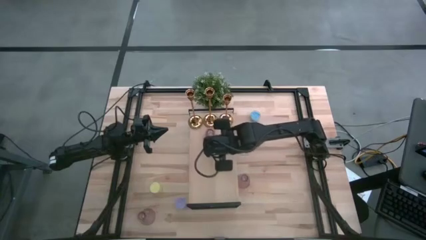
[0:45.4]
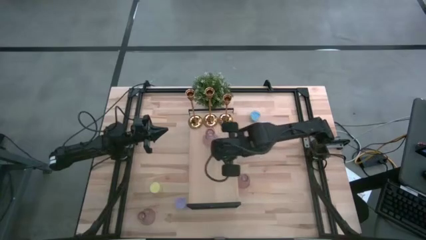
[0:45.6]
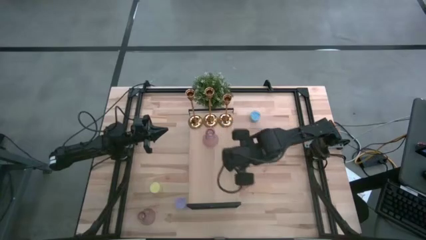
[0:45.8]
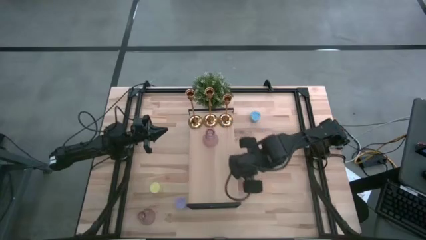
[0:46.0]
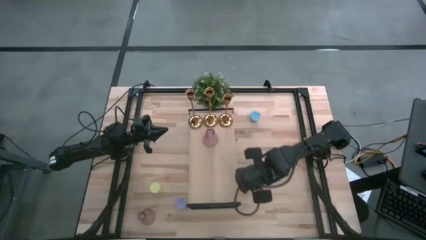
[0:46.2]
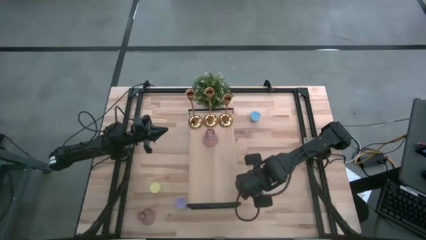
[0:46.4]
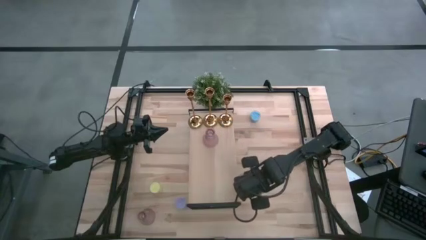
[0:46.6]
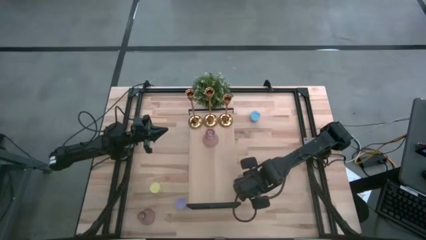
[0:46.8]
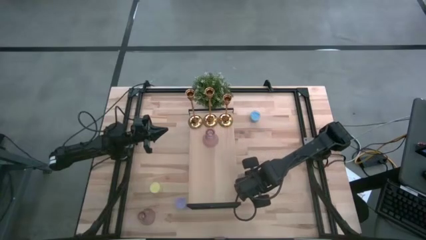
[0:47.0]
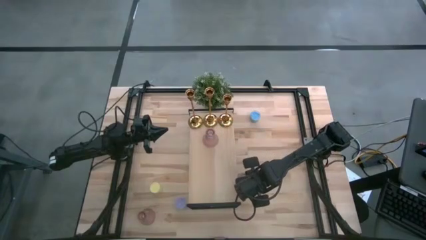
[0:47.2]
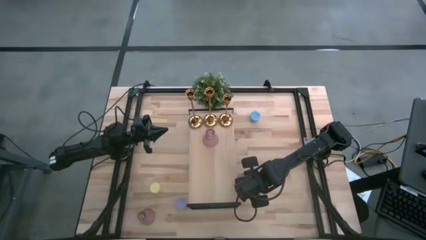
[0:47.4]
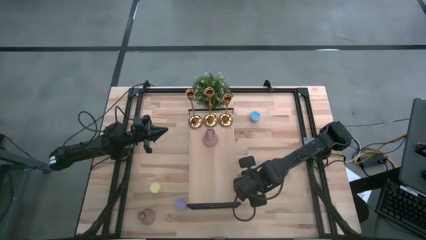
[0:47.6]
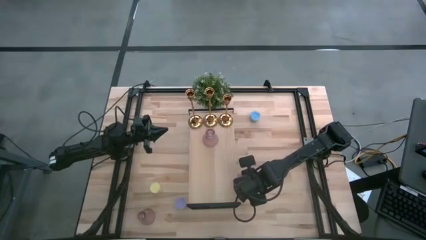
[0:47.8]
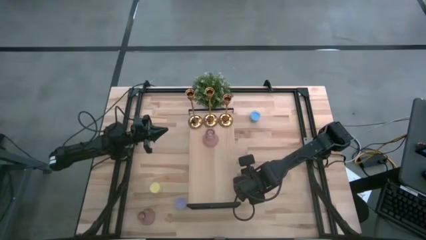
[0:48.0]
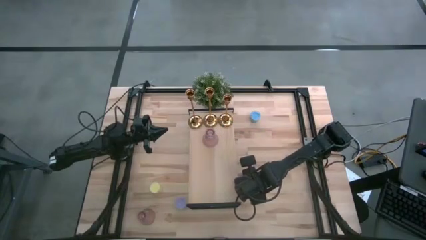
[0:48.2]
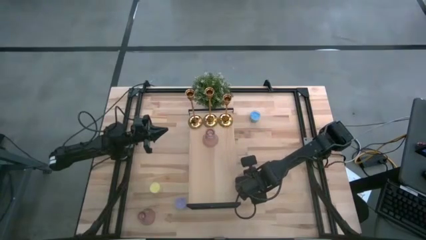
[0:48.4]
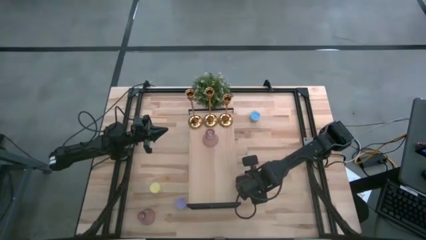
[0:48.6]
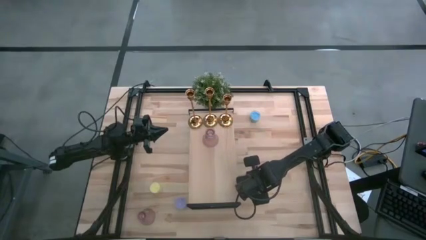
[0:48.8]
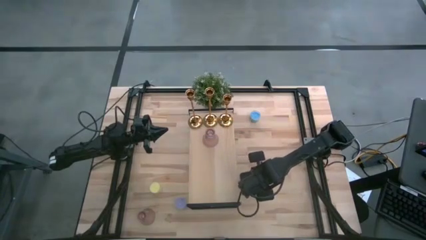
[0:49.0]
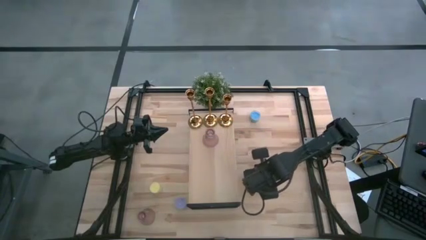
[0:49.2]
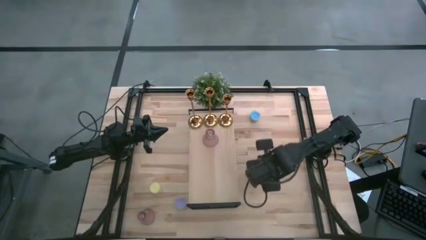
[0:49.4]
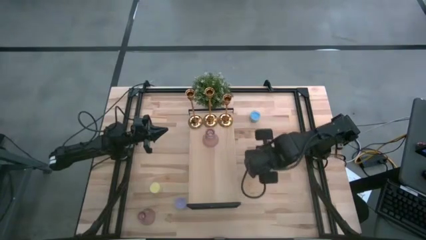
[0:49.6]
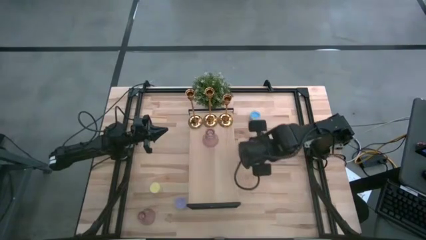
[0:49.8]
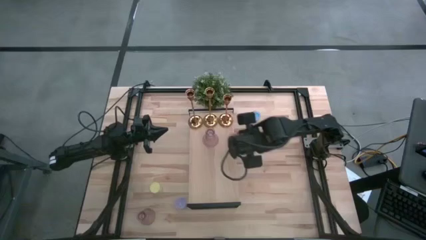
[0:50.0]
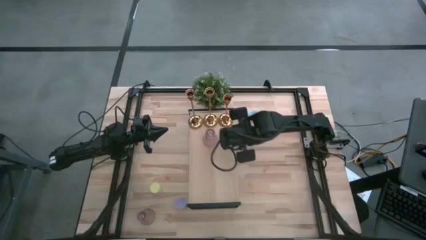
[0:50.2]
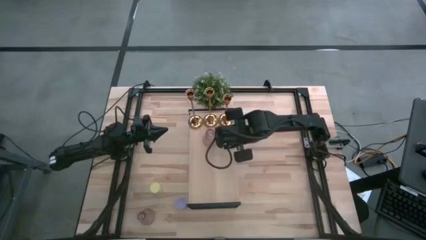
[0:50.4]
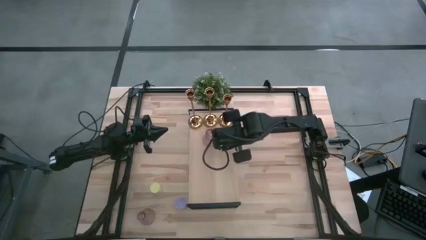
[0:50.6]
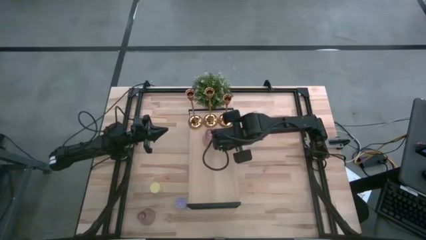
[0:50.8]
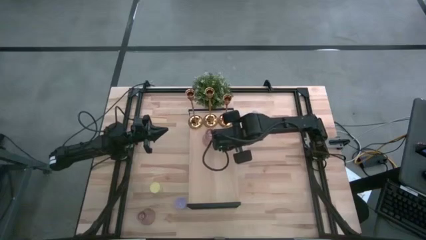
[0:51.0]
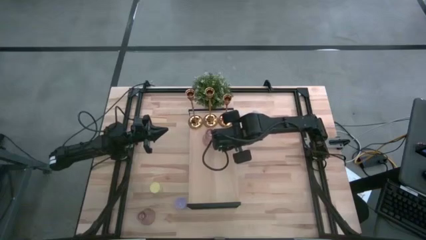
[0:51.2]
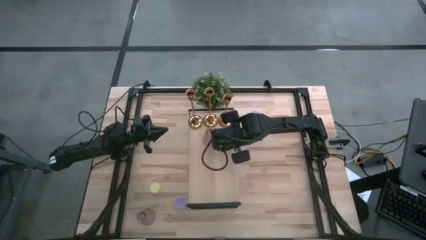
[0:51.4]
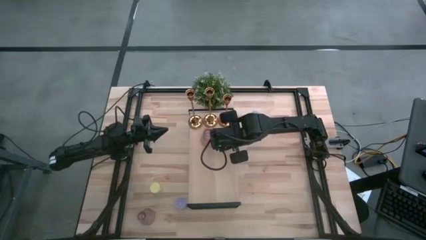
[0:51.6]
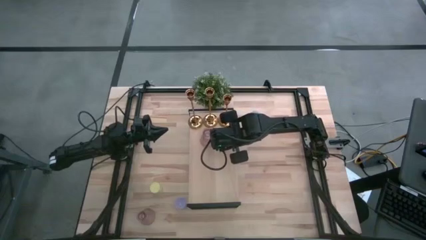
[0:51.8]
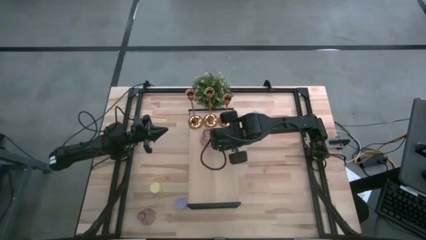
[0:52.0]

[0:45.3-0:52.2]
Task: Pick & Place candle stick holders
Put the top pink glass candle holder on the shelf aligned with the pink glass candle holder

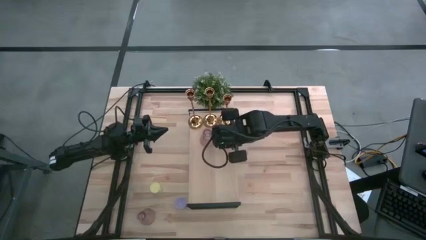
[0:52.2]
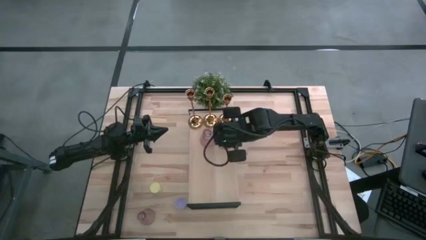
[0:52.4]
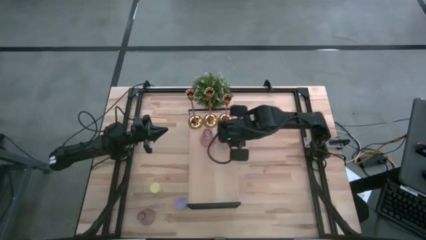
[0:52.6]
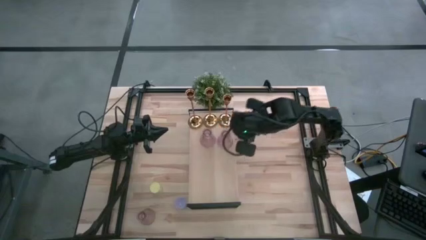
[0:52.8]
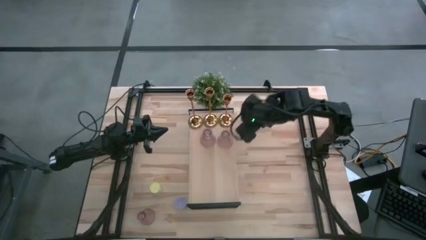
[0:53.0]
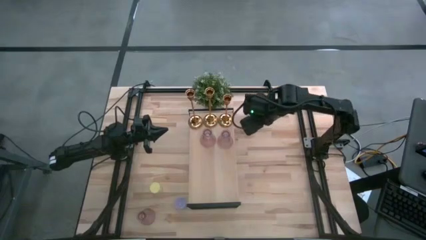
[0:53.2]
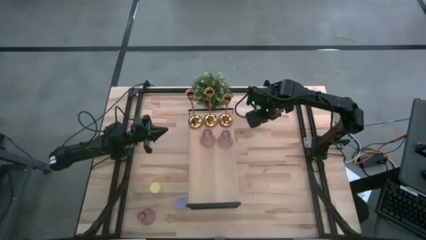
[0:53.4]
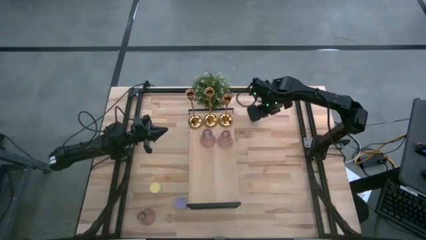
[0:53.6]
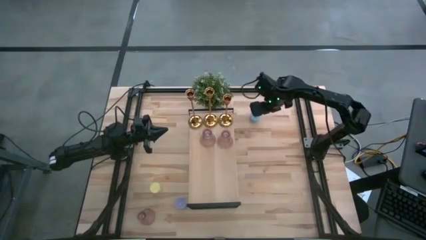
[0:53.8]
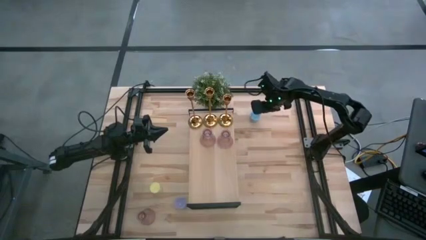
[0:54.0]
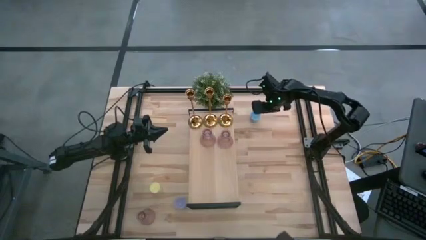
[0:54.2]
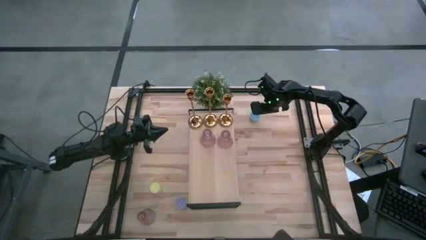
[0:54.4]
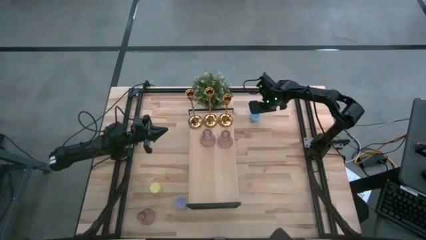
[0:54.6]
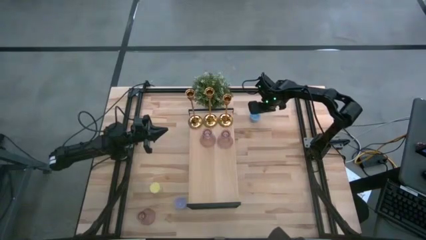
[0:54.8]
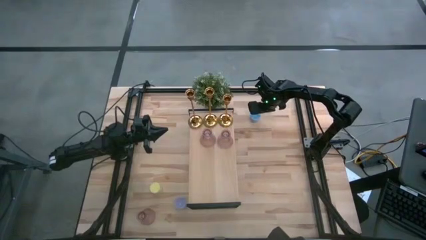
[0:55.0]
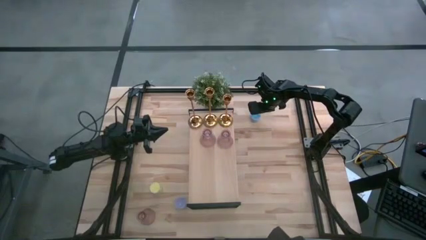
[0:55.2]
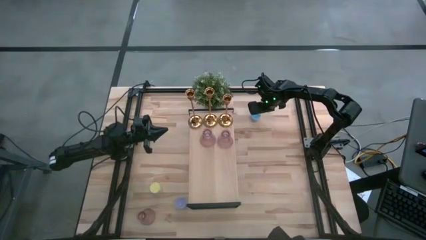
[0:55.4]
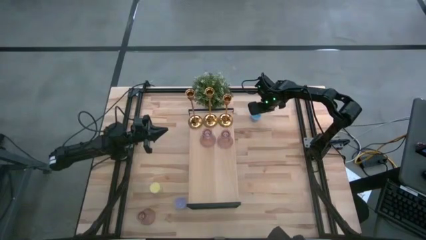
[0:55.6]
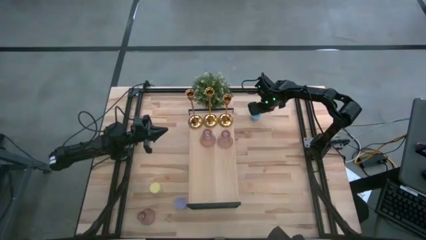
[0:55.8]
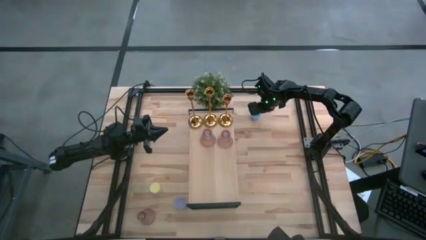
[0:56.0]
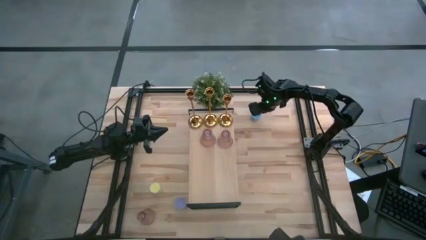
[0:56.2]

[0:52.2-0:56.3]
Put the blue scented candle on the shelf

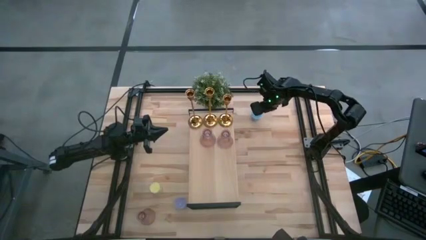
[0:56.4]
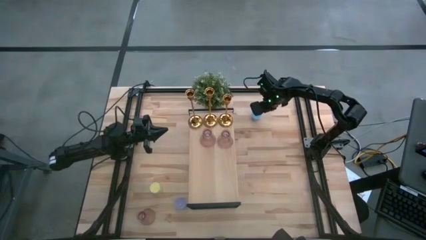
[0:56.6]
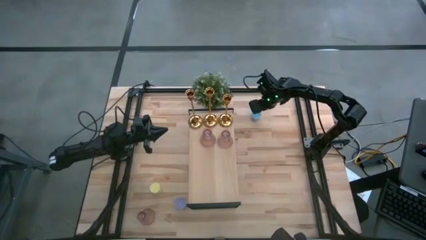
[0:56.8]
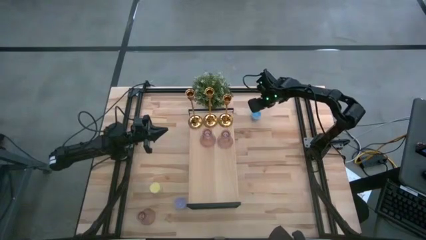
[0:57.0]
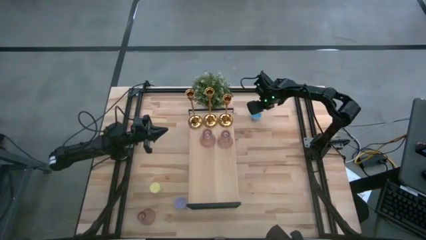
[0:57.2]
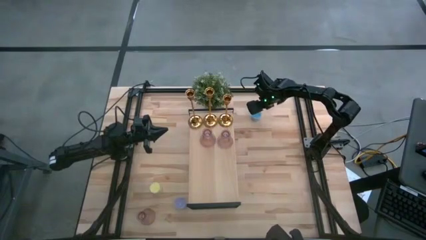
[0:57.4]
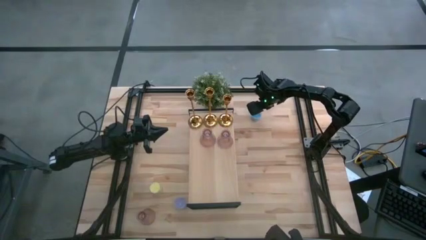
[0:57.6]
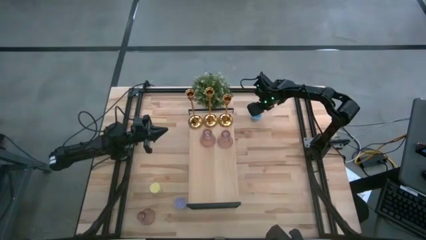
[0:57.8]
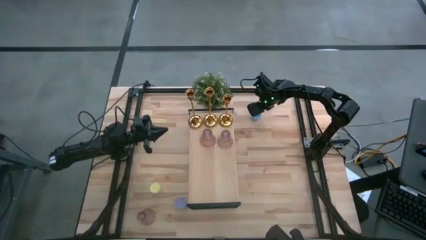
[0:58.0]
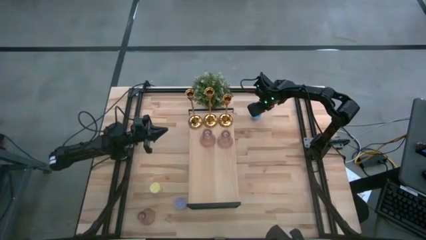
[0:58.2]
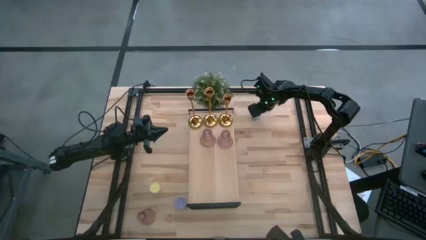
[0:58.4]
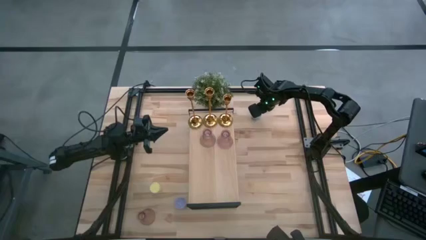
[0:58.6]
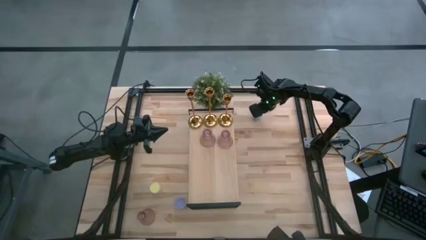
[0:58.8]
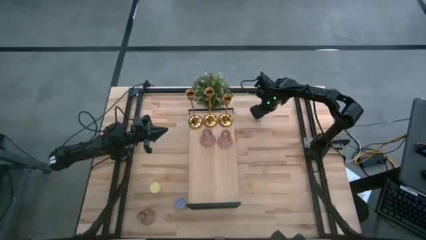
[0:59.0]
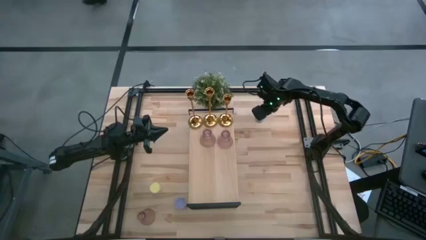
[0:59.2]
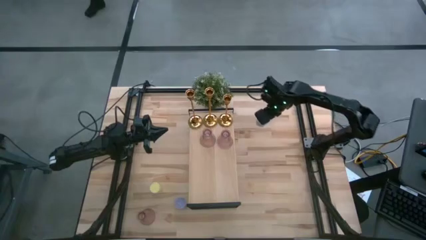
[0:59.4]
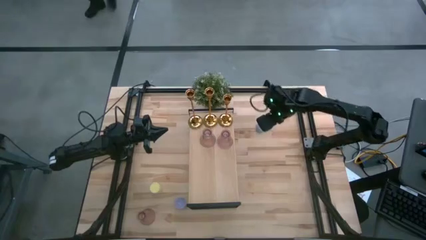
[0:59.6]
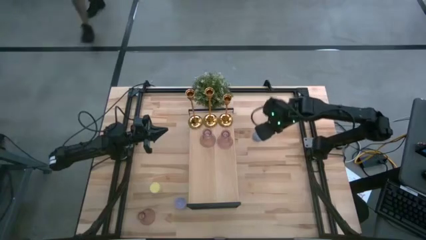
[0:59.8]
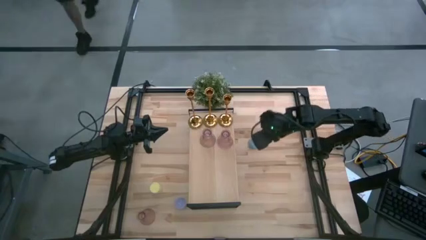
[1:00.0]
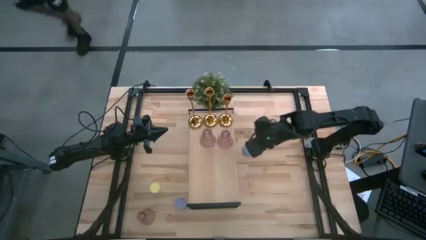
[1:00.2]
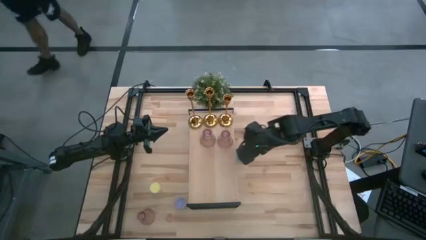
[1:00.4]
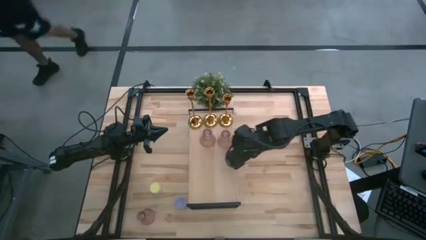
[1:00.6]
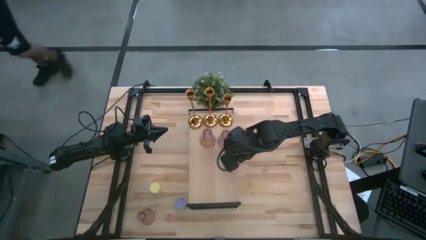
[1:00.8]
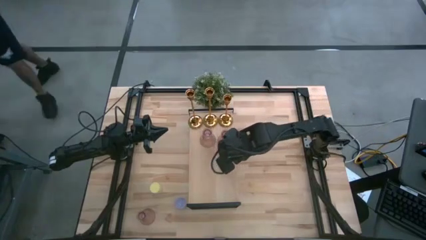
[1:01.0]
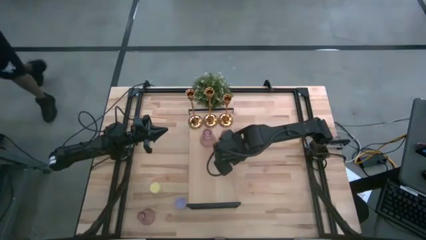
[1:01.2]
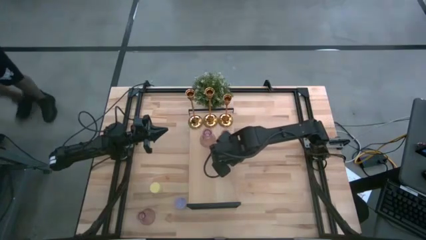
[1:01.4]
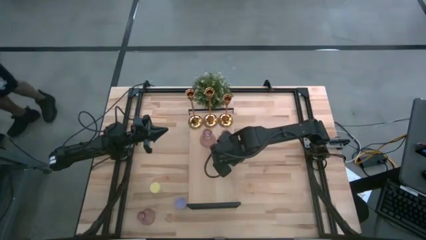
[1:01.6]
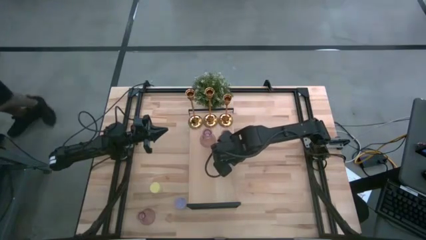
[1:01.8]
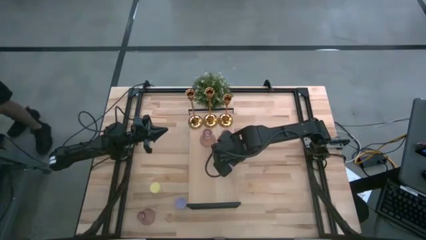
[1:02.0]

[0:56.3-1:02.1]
Put the blue scented candle on the shelf
